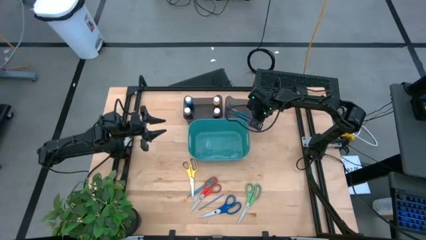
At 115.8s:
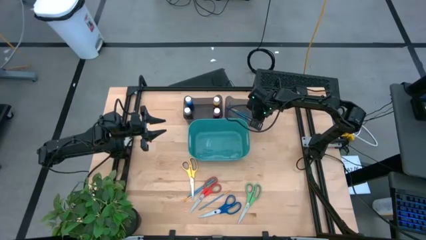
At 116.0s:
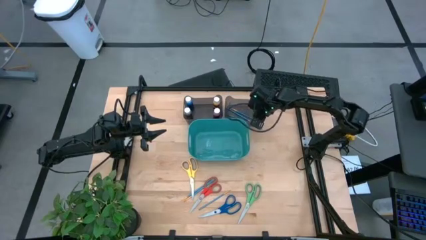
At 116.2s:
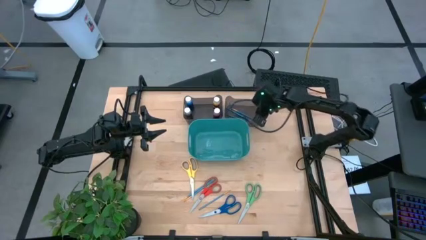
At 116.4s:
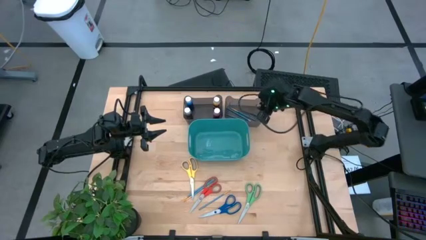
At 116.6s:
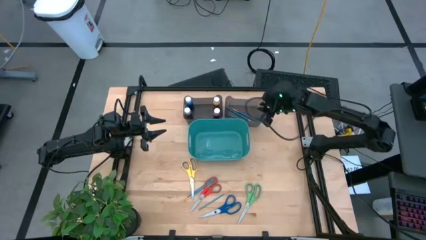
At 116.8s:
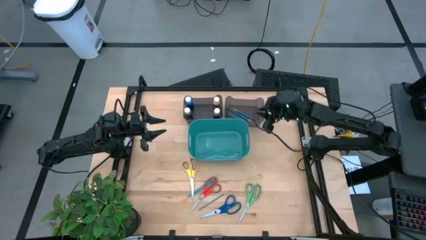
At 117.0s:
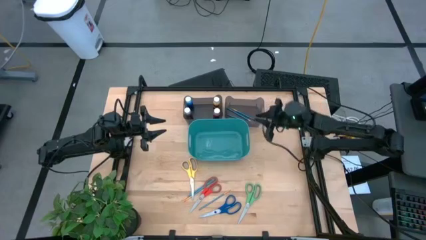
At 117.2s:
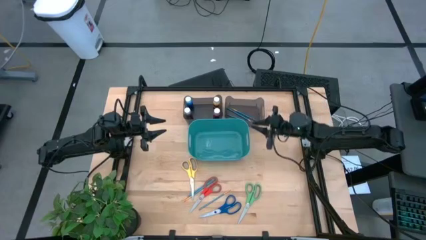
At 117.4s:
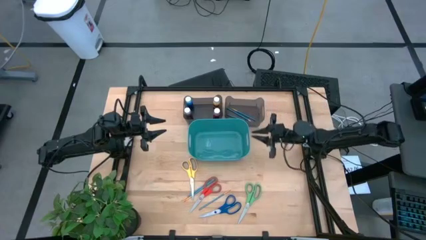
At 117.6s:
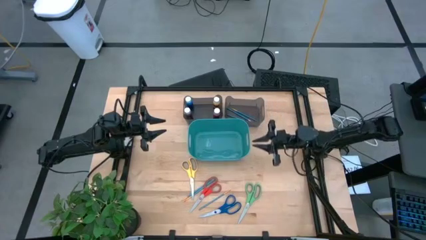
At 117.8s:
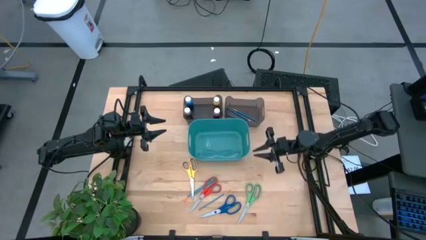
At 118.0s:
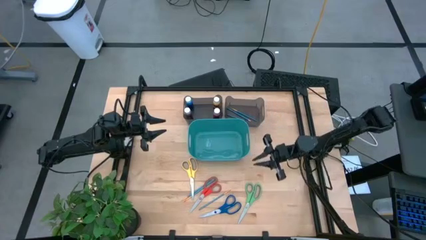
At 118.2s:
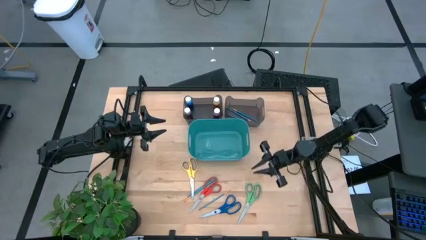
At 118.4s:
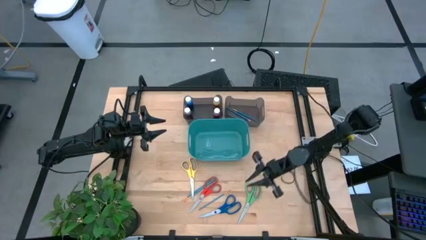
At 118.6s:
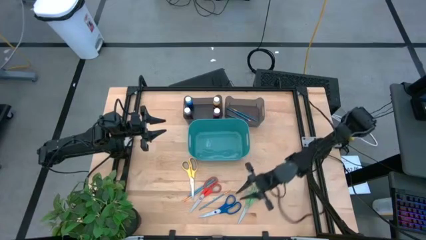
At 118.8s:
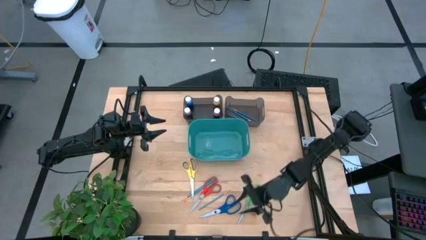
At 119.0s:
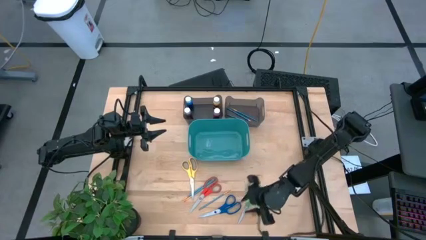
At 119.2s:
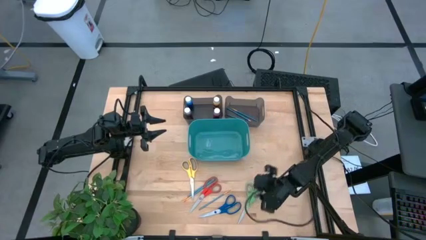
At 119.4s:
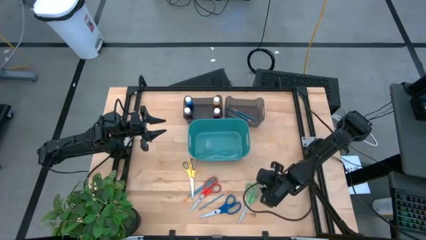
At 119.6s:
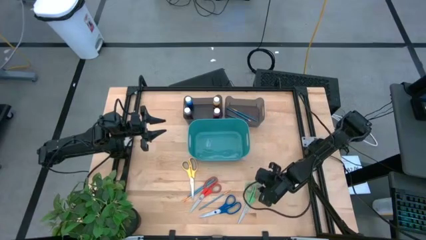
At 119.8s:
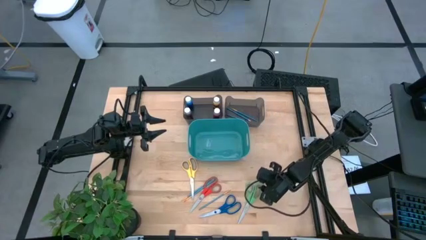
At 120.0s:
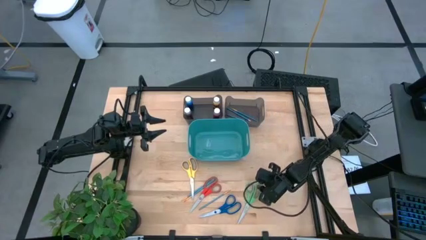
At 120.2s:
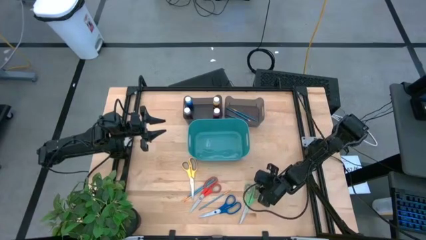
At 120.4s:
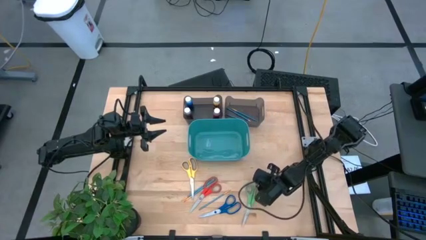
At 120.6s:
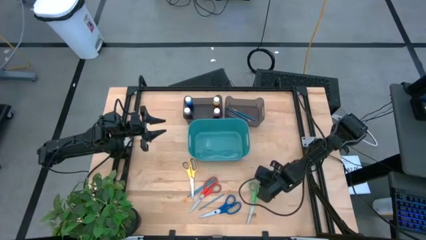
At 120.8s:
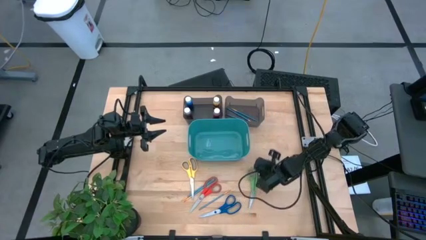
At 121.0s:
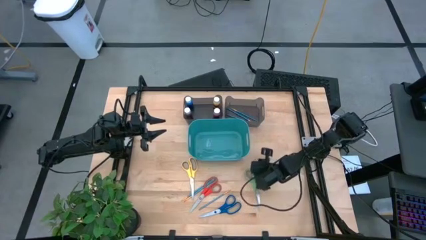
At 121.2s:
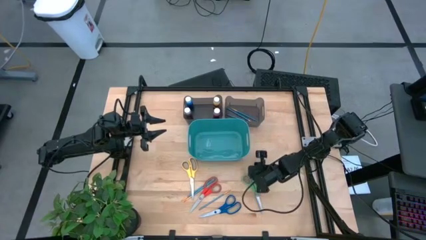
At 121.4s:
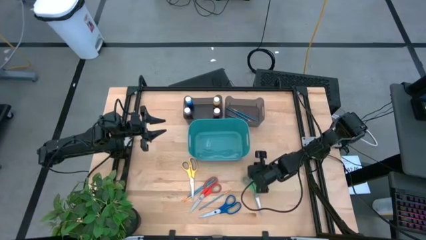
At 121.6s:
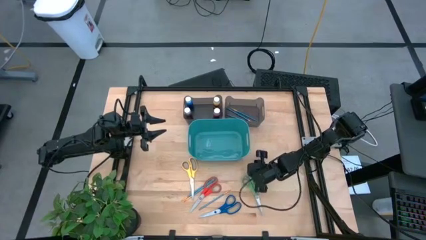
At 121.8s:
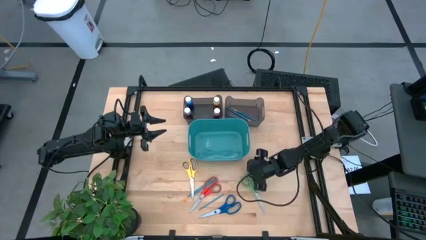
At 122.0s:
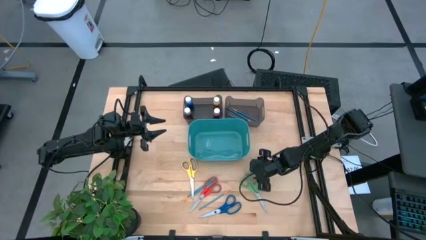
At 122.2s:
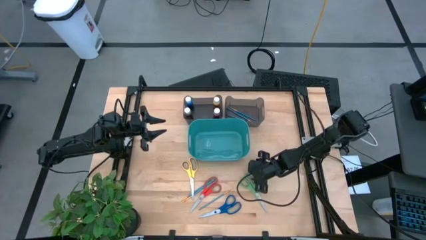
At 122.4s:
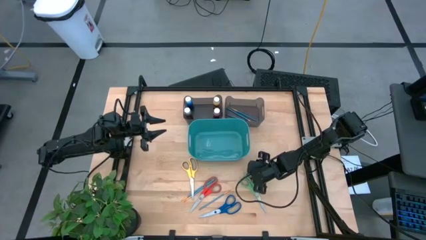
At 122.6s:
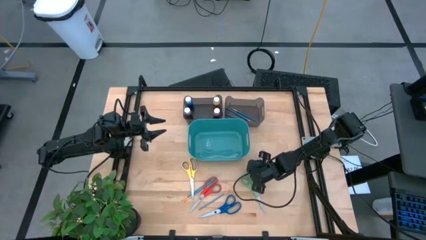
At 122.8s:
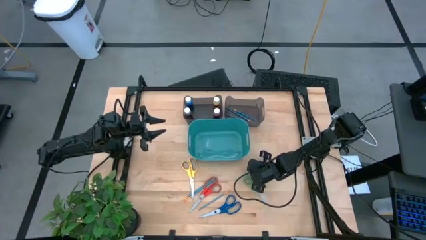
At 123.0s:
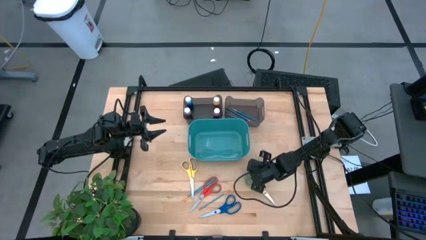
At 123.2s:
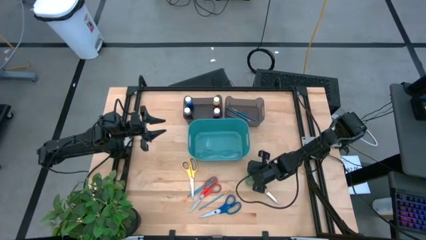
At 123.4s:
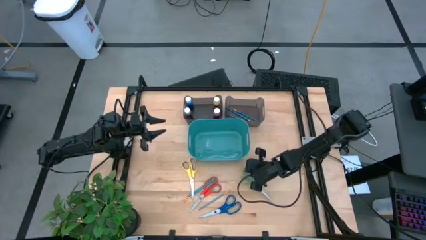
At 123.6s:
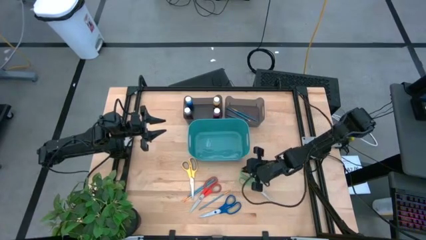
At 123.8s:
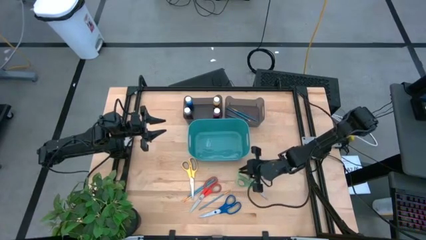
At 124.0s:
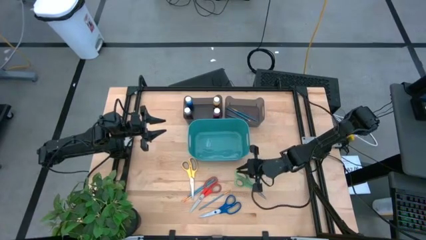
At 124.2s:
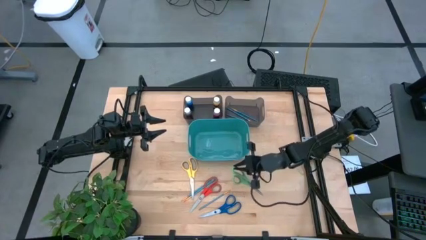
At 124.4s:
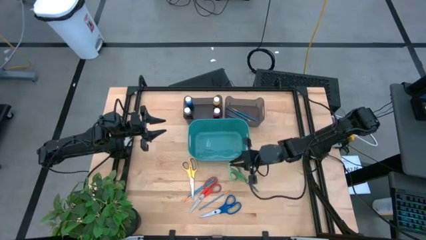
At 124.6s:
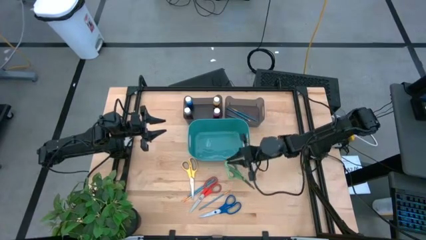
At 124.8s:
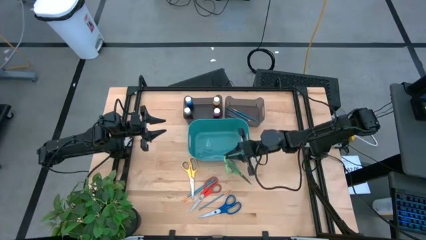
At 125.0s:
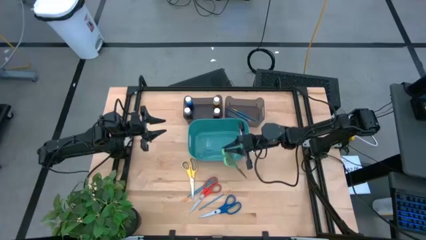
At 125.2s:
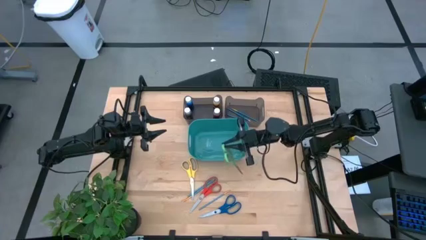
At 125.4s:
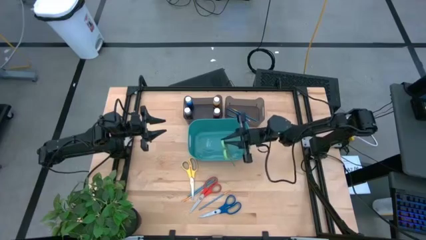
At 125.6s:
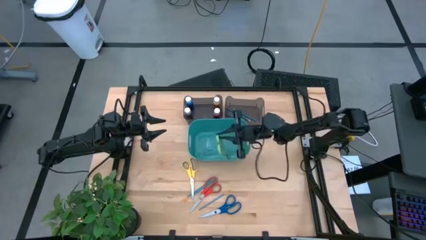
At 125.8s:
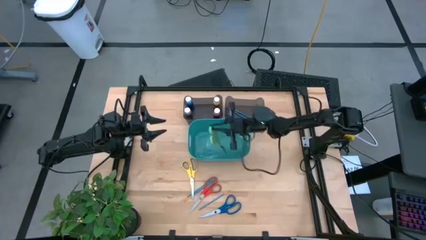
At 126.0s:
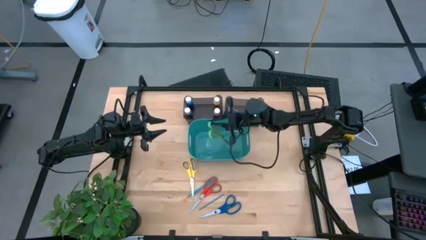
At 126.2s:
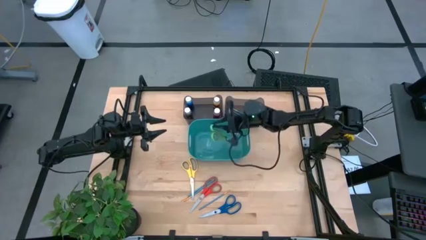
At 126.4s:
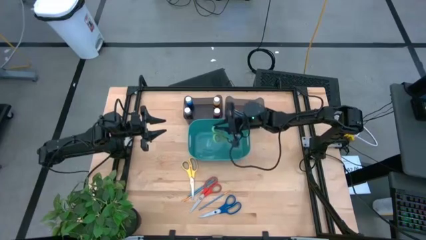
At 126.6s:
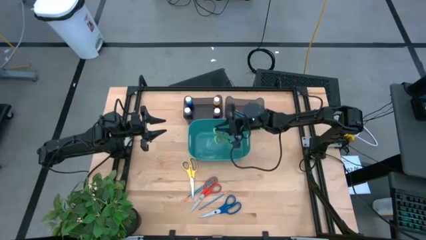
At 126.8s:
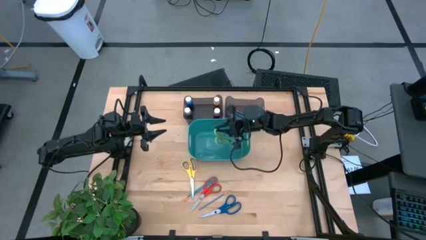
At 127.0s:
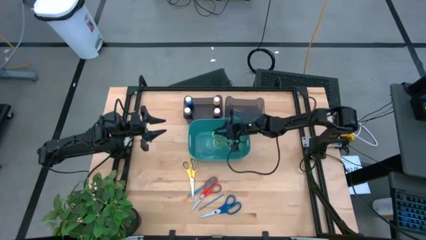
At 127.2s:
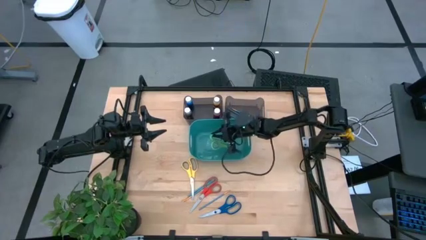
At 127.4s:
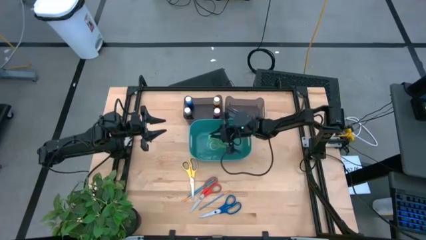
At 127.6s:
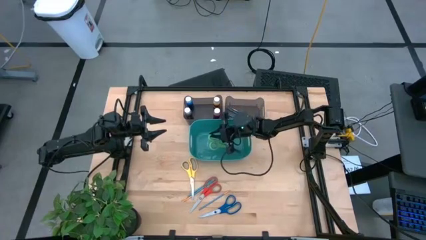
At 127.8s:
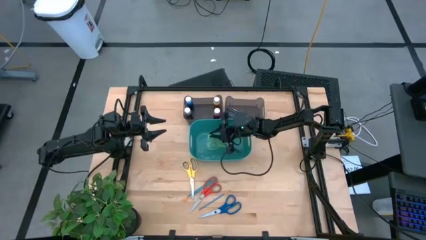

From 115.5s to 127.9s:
Task: Pick & Place Paint Supplies
Put the green scissors into the green bin

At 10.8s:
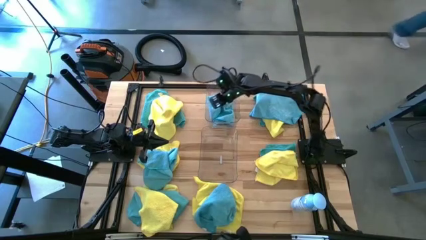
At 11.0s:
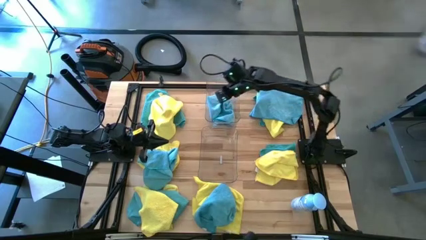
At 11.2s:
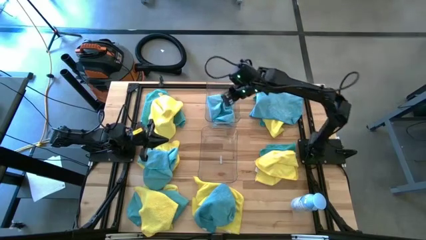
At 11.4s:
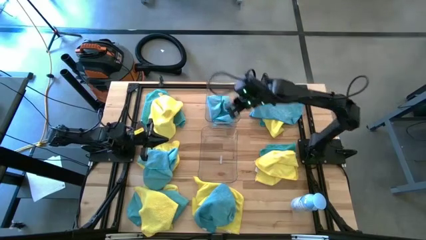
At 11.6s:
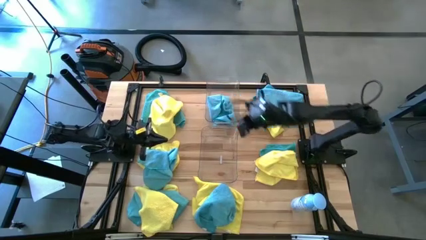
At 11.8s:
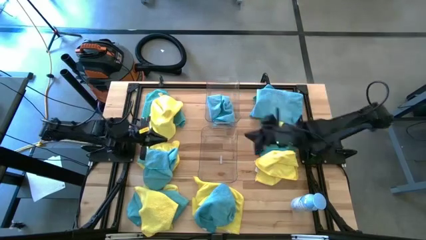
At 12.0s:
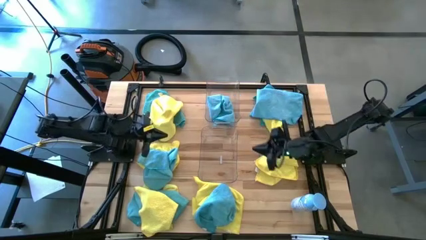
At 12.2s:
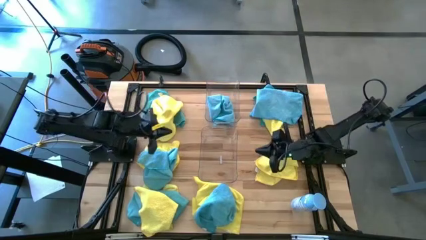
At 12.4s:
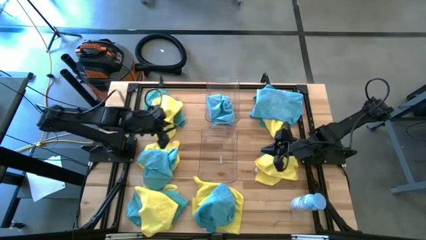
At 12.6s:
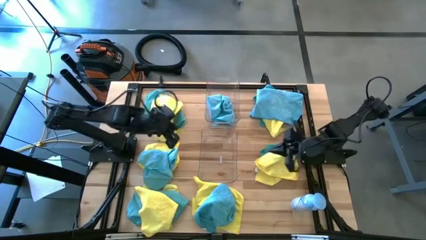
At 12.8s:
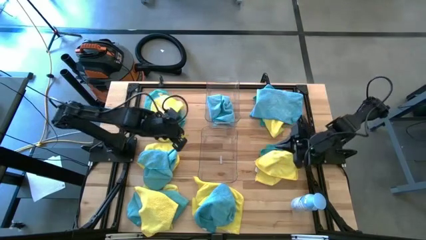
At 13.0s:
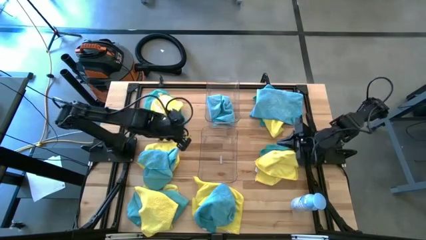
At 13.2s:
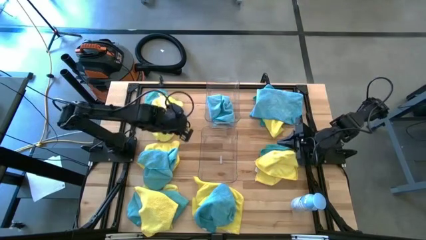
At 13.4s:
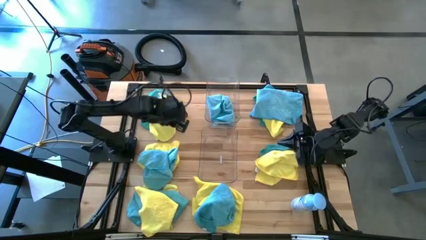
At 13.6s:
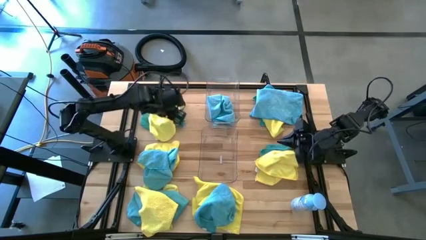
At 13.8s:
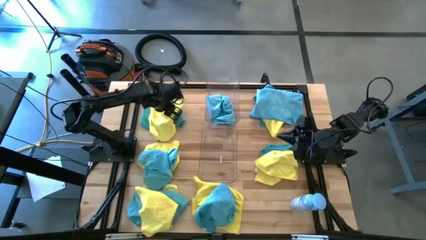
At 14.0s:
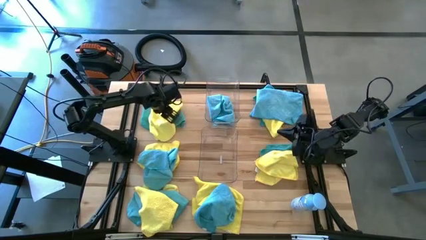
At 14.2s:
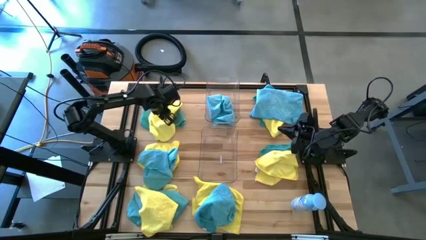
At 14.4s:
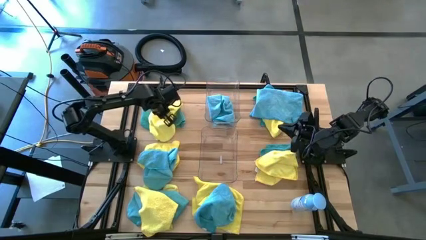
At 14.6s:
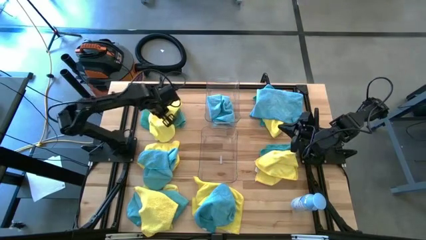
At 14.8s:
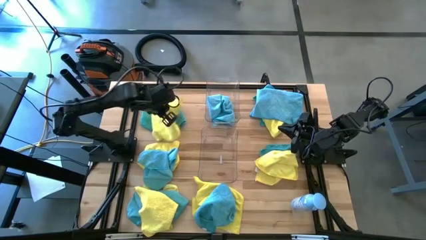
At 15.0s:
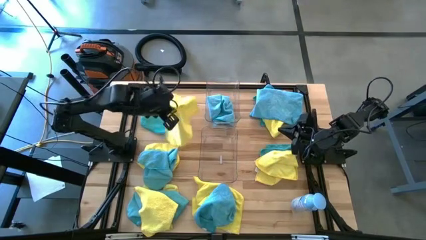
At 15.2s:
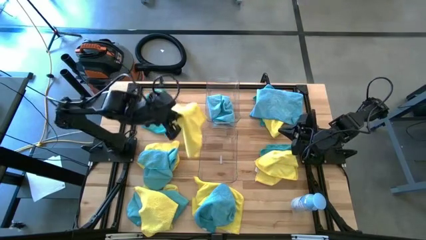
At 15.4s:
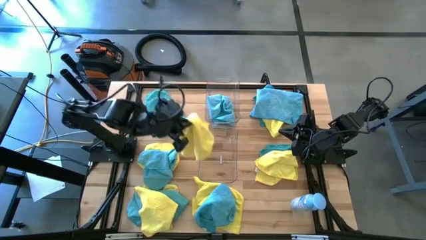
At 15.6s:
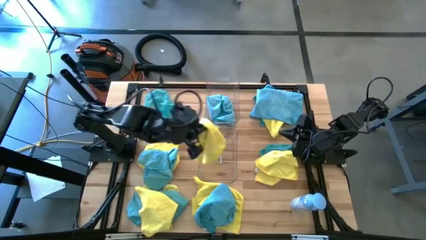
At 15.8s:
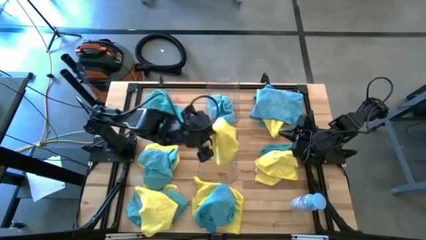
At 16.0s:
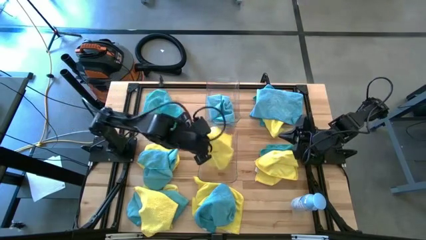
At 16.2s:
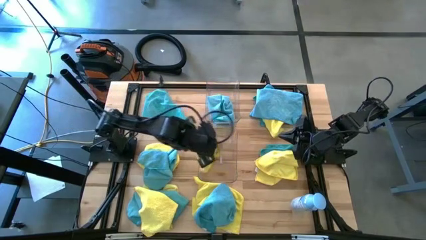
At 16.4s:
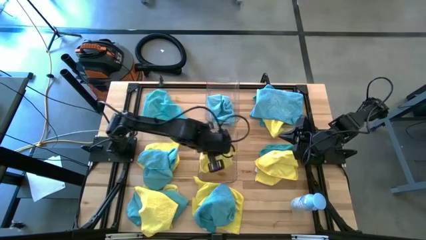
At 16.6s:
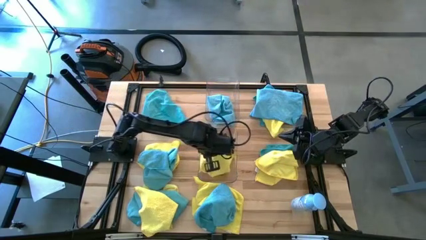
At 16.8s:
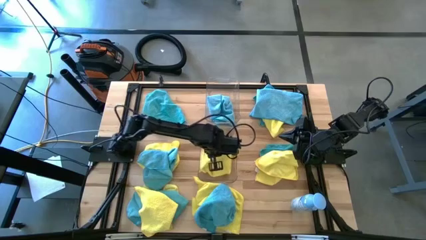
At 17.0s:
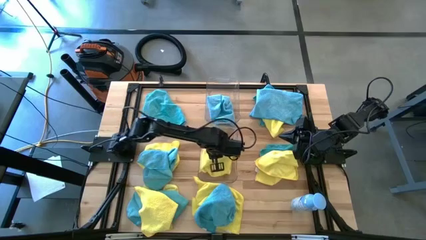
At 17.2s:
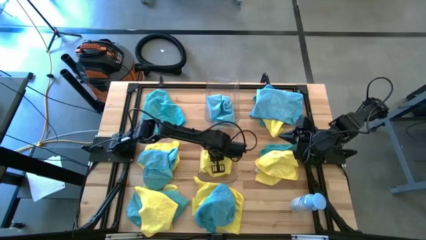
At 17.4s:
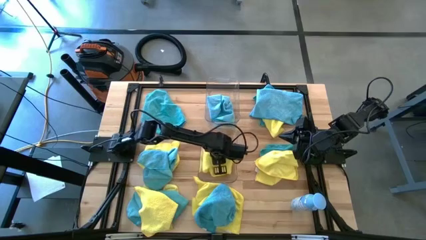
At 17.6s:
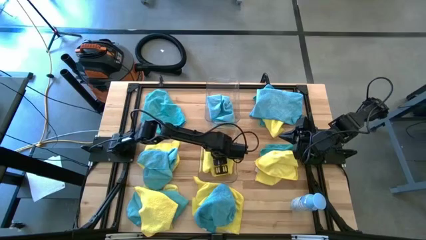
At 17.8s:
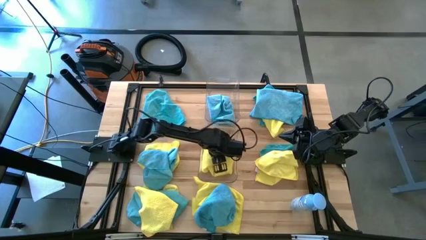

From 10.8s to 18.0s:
Task: Sort microfiber towel by color & place in baskets
Put the yellow towel into the bottom transparent bin
